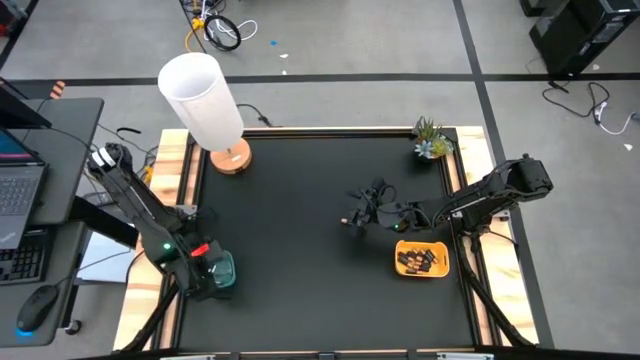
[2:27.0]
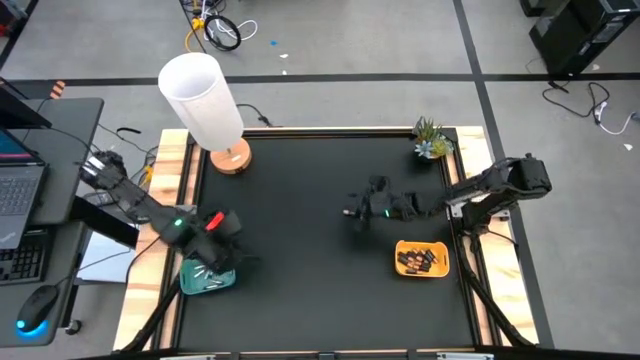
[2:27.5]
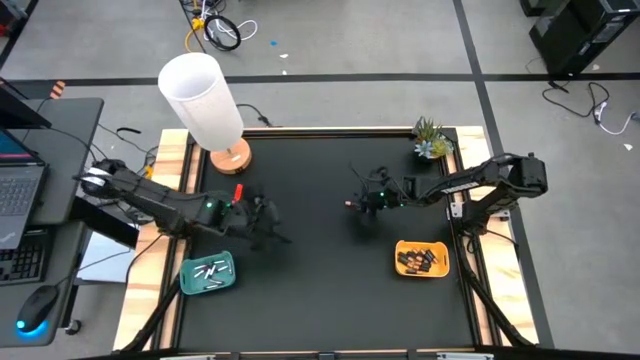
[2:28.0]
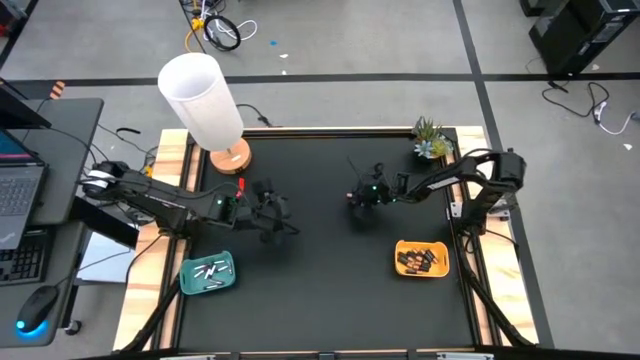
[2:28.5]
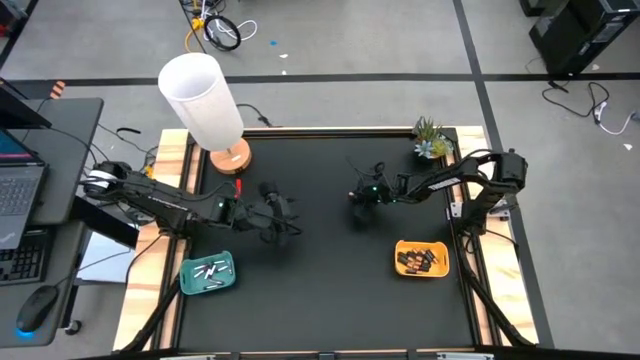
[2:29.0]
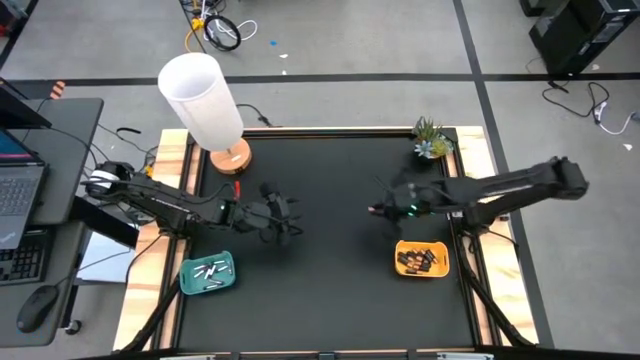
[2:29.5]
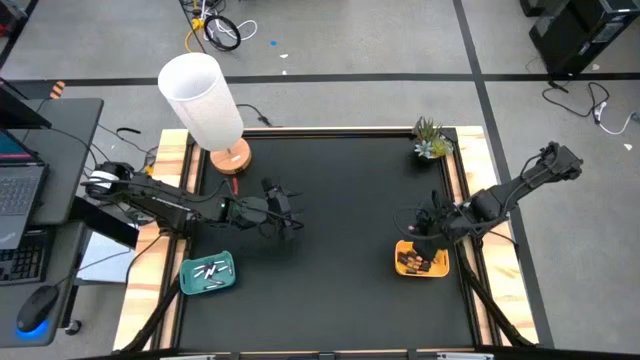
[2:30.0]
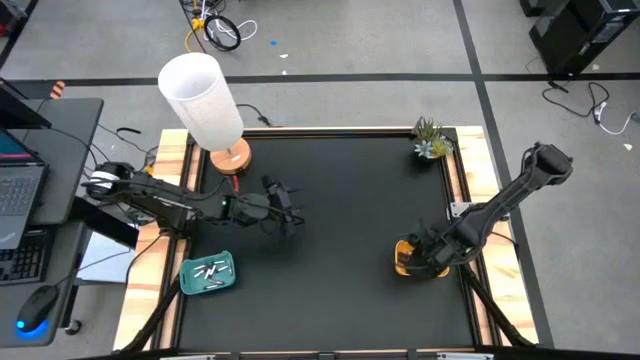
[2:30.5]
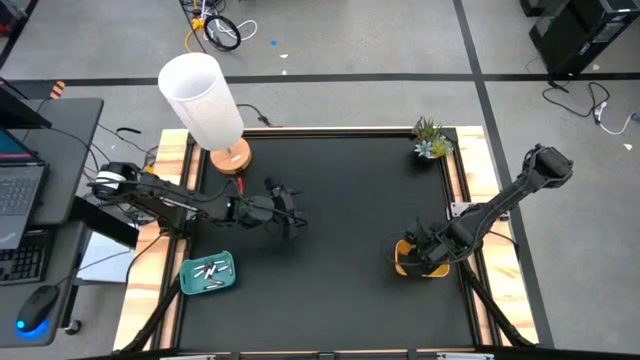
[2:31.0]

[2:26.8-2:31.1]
Task: Sort batteries
Put the black battery into the yellow bin

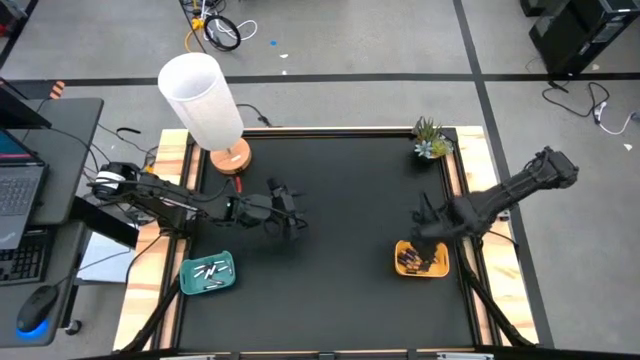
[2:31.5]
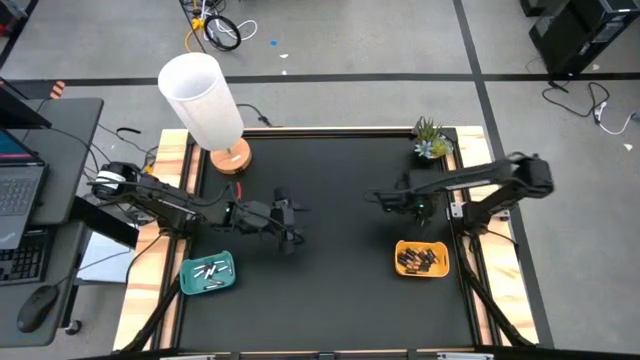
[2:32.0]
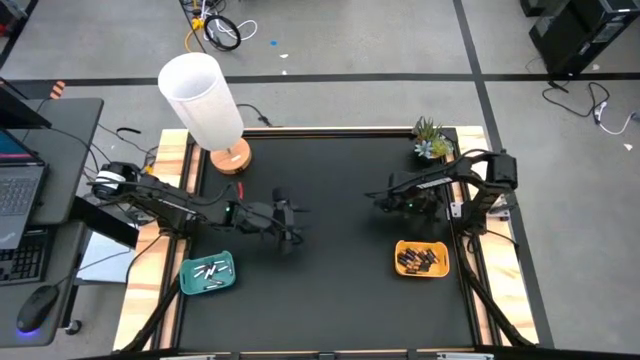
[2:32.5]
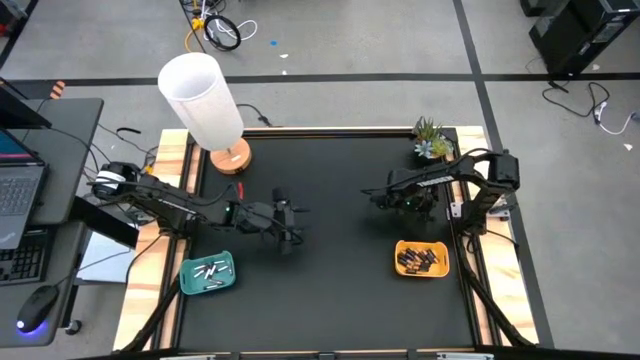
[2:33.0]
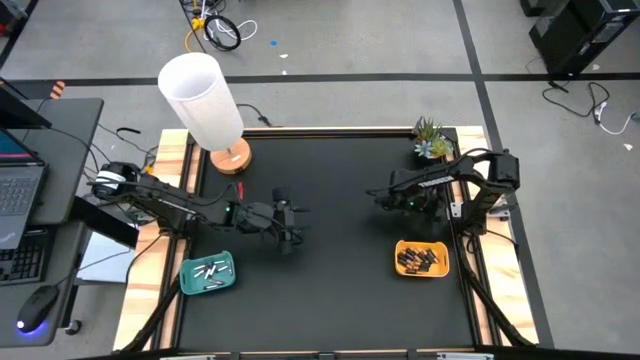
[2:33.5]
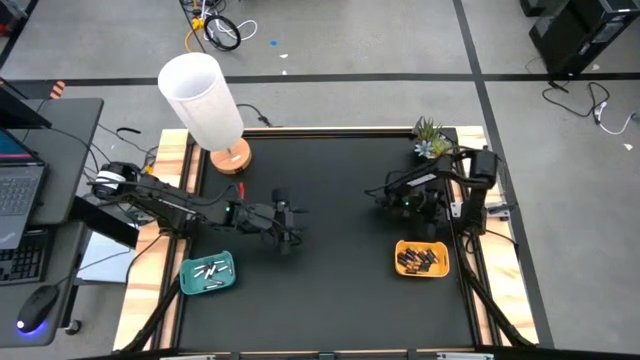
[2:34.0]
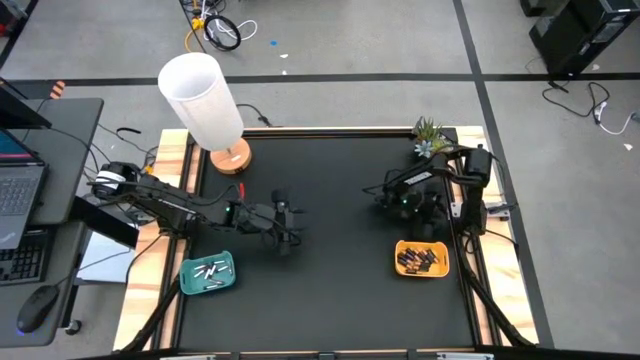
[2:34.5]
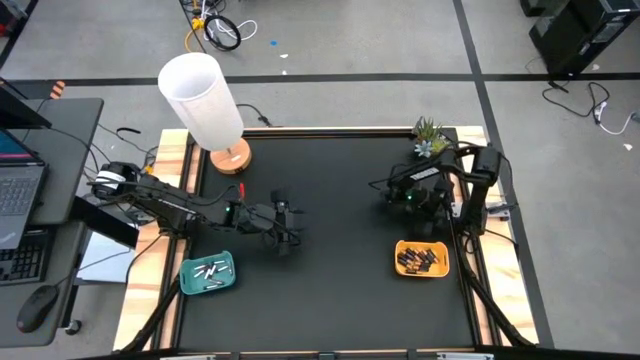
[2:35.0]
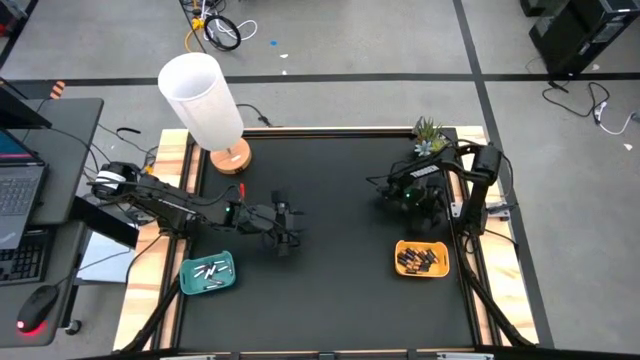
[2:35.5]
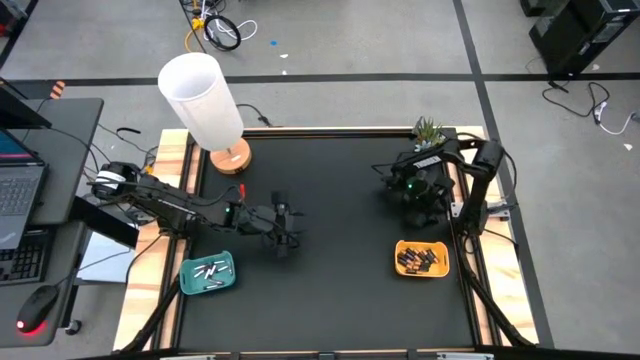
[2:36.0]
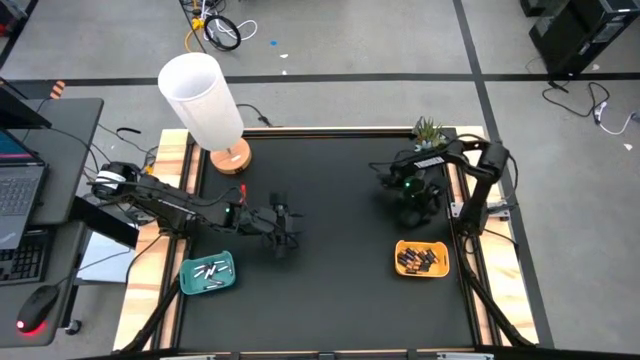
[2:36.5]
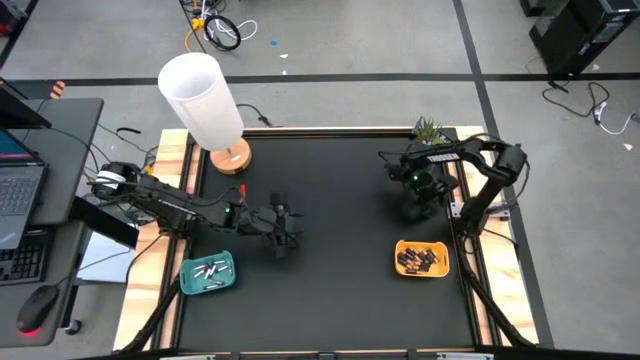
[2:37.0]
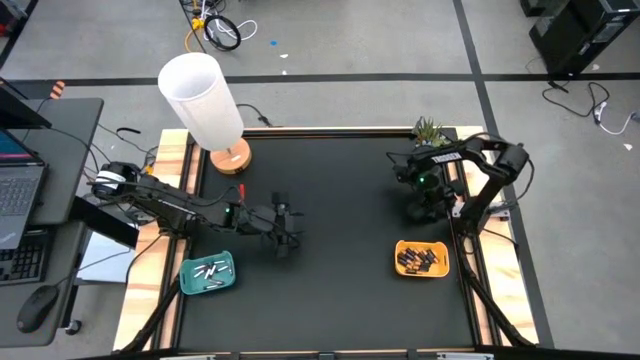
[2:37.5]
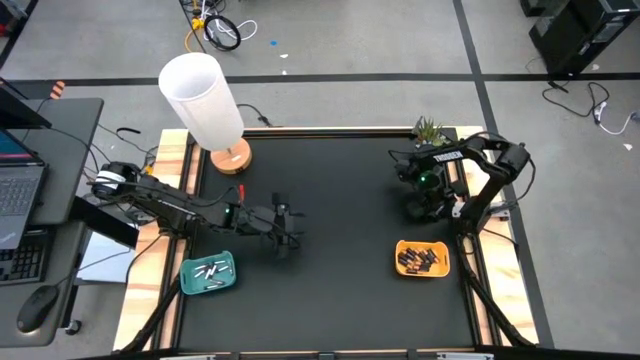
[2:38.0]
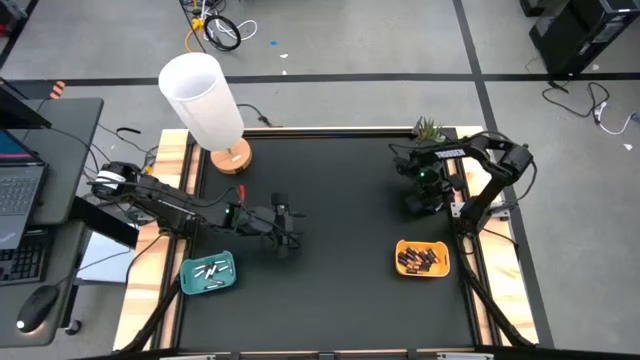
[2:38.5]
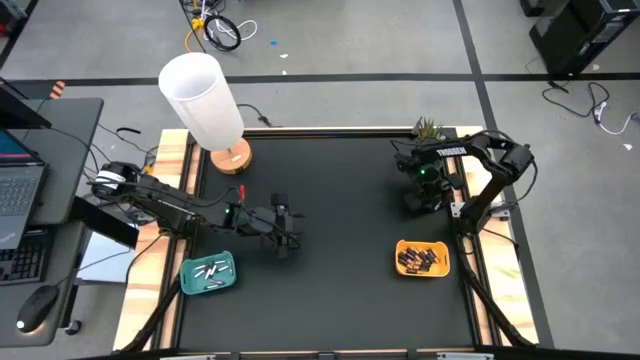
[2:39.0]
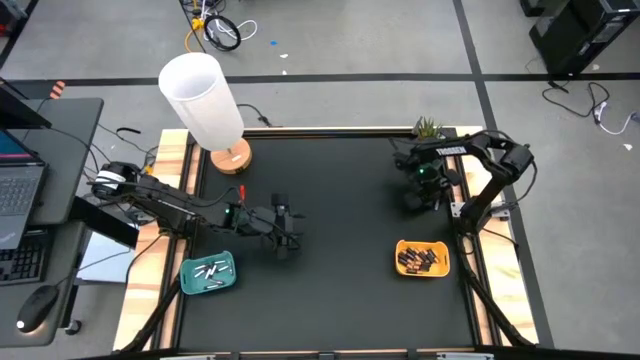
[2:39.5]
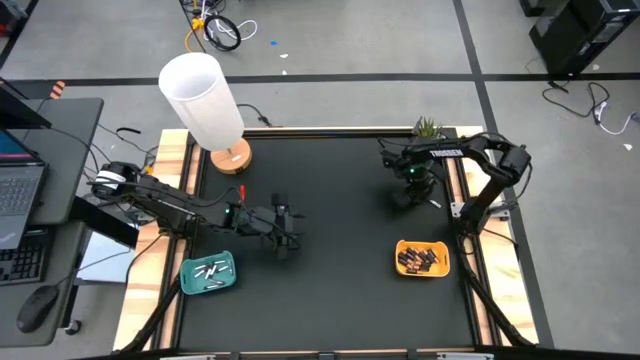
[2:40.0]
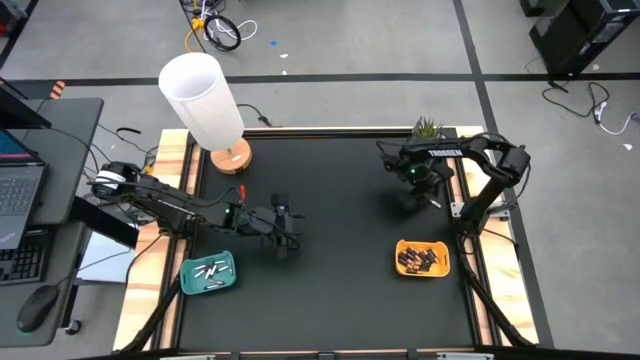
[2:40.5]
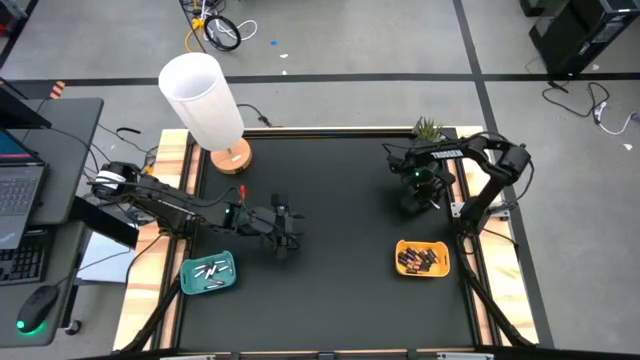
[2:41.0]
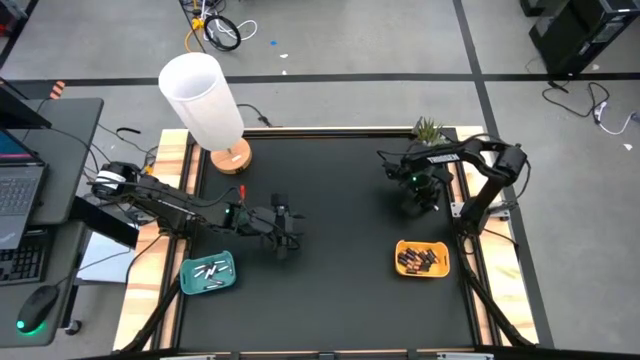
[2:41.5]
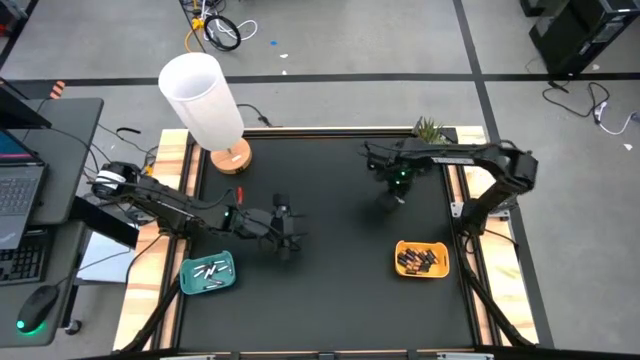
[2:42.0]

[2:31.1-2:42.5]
Put the silver battery into the green bin

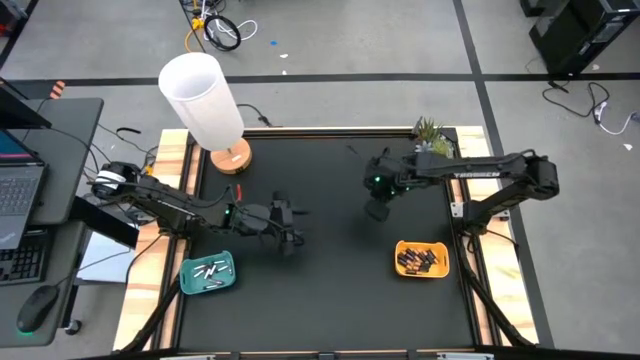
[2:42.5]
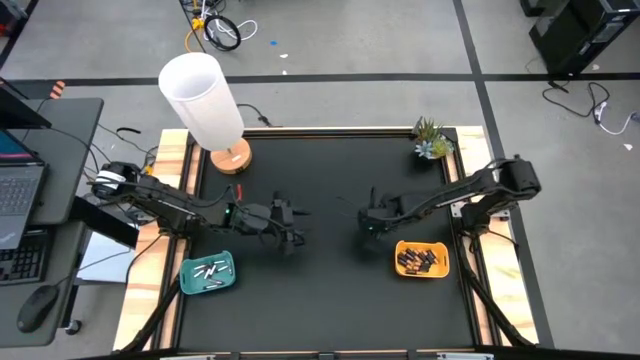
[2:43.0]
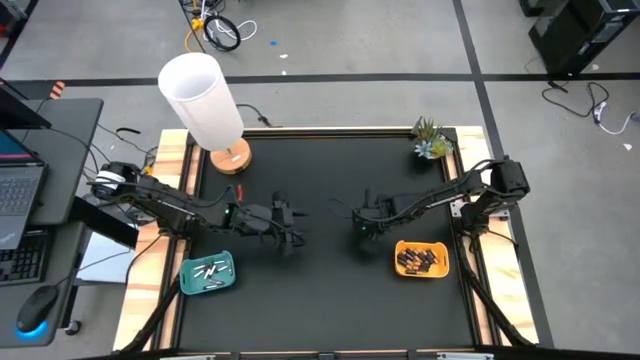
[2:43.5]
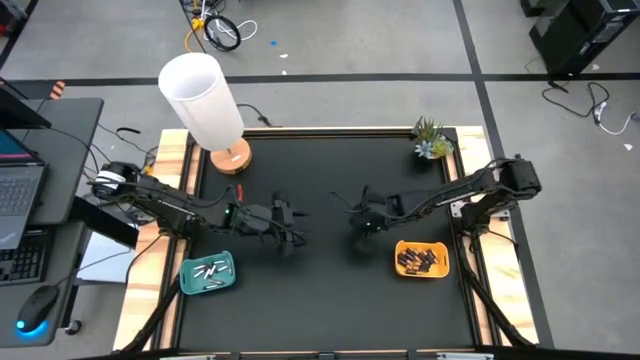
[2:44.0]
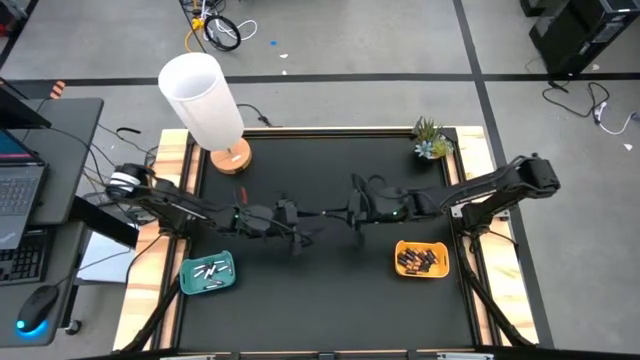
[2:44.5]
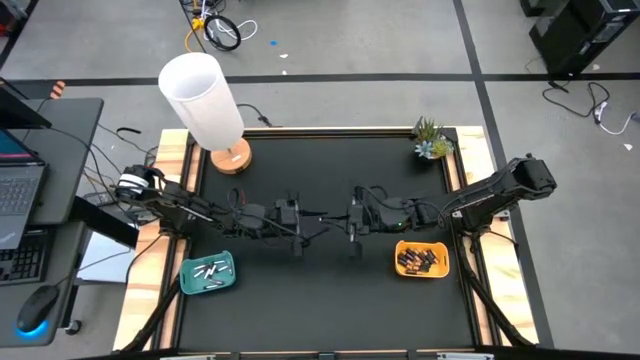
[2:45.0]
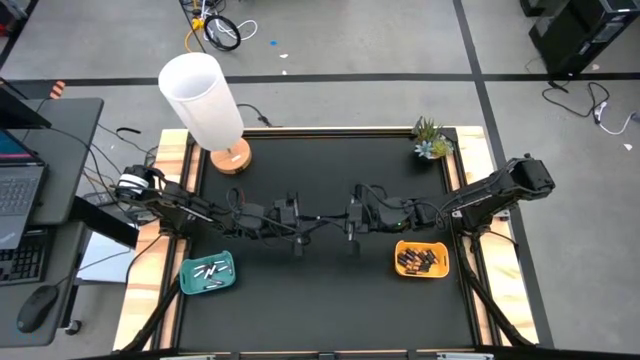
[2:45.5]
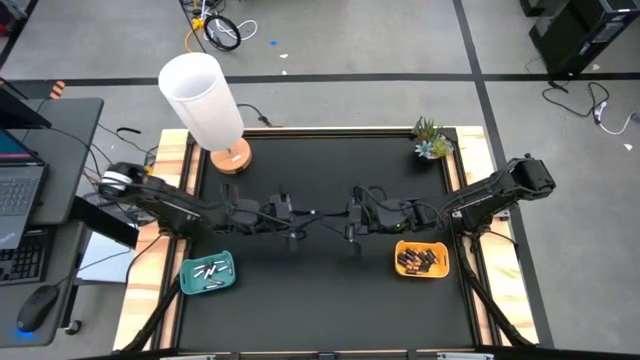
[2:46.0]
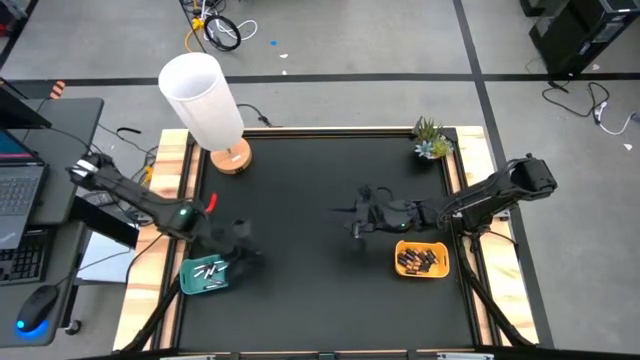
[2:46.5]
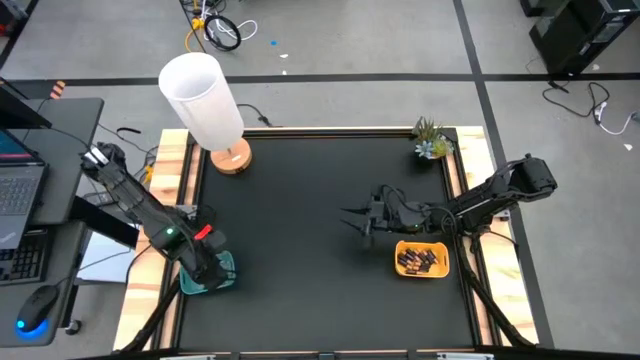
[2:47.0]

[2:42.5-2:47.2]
Put the silver battery into the green bin
